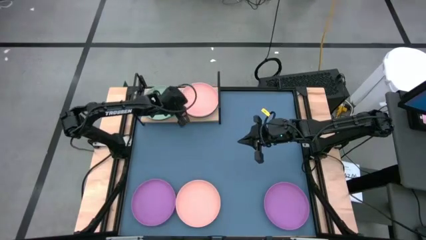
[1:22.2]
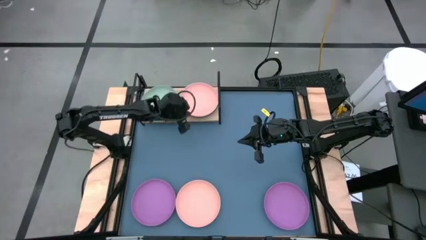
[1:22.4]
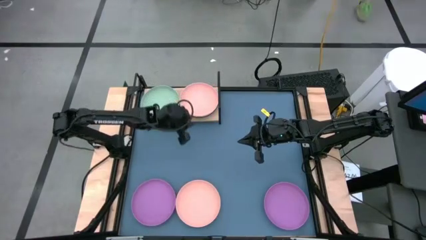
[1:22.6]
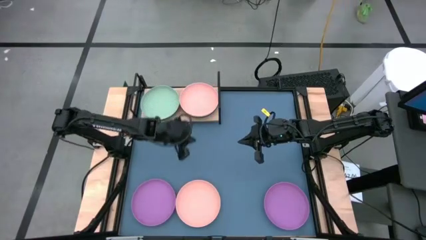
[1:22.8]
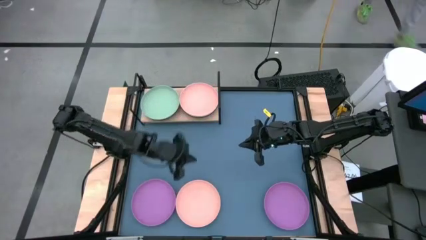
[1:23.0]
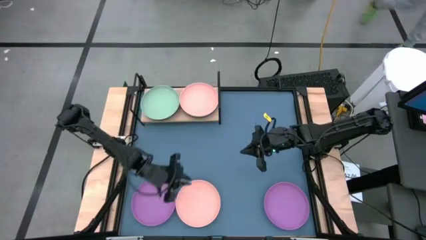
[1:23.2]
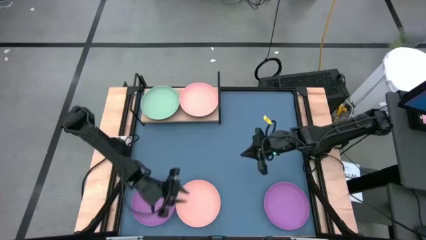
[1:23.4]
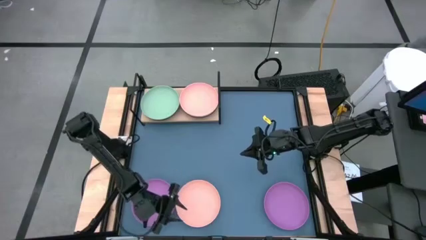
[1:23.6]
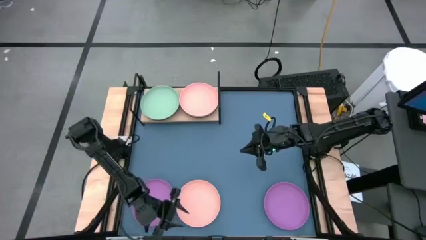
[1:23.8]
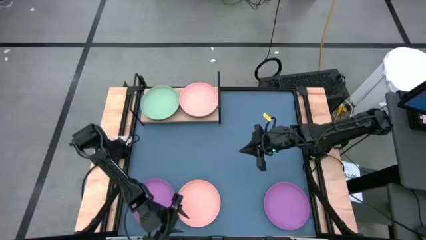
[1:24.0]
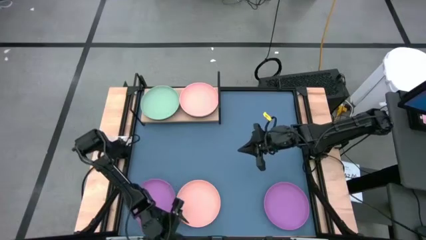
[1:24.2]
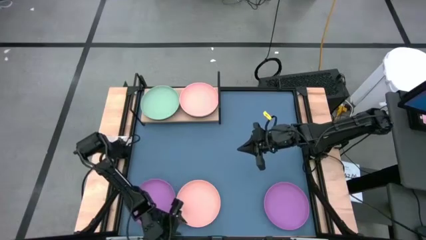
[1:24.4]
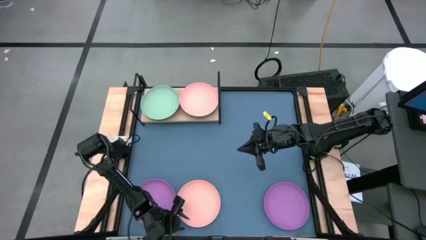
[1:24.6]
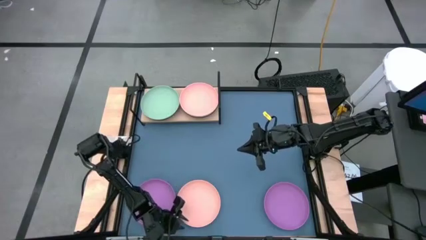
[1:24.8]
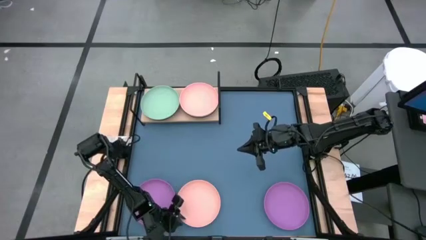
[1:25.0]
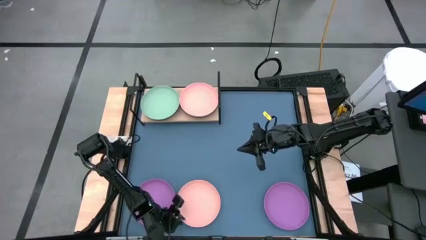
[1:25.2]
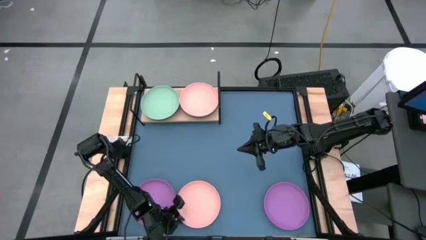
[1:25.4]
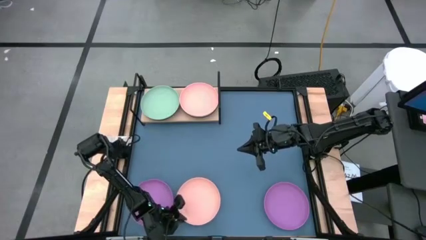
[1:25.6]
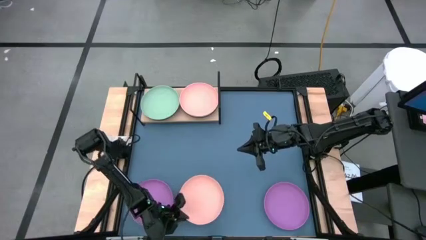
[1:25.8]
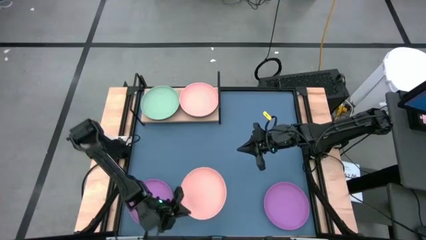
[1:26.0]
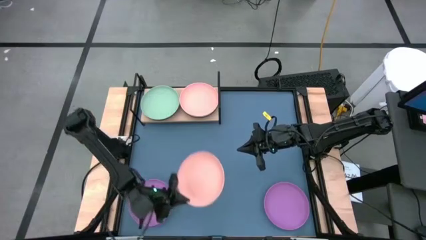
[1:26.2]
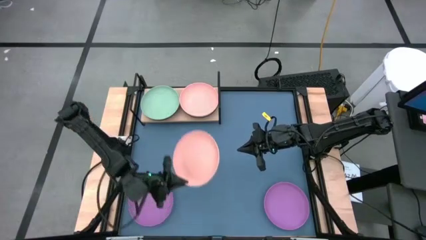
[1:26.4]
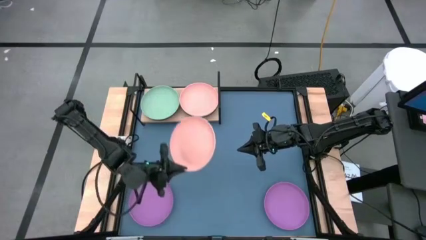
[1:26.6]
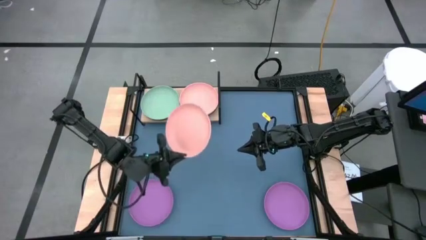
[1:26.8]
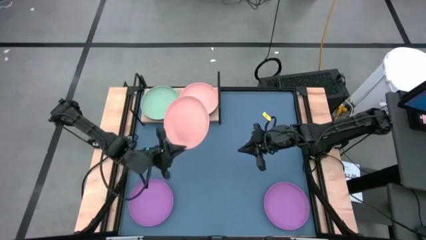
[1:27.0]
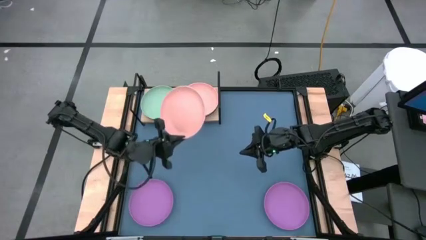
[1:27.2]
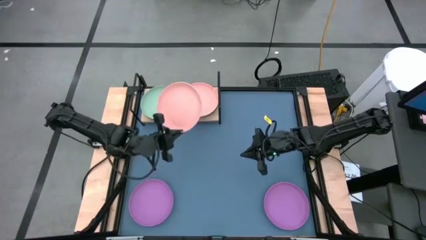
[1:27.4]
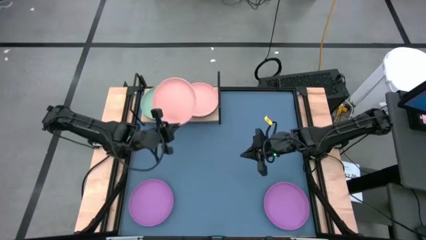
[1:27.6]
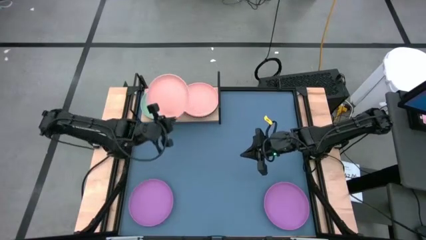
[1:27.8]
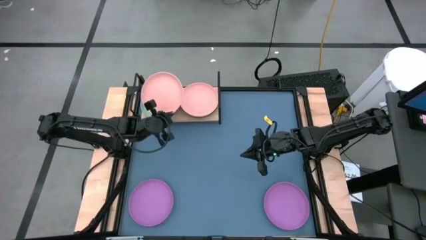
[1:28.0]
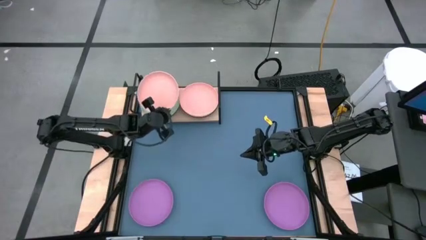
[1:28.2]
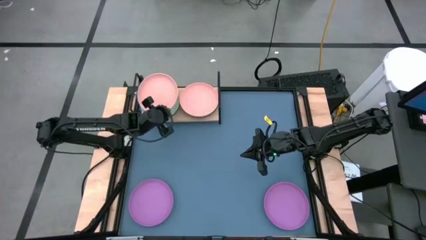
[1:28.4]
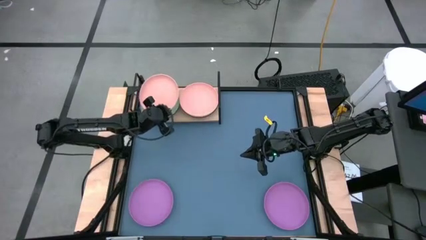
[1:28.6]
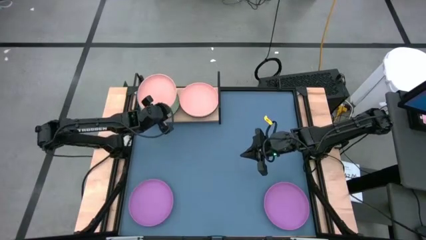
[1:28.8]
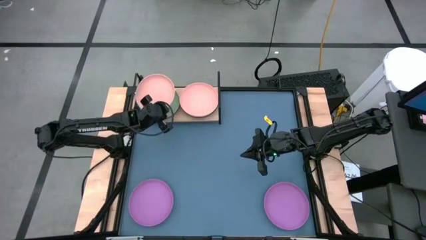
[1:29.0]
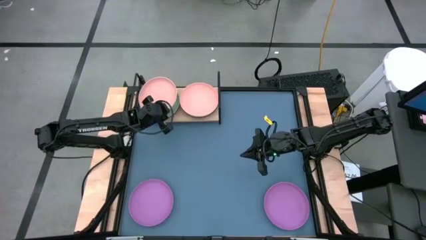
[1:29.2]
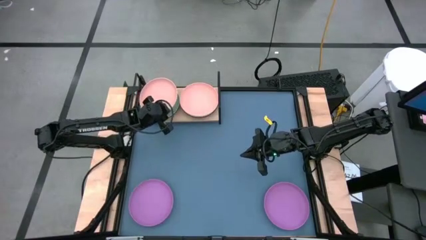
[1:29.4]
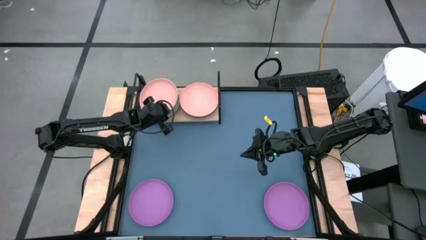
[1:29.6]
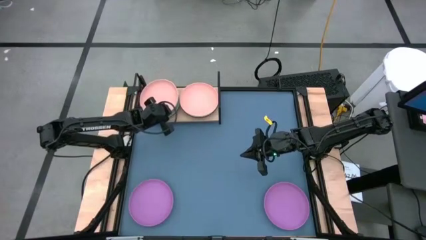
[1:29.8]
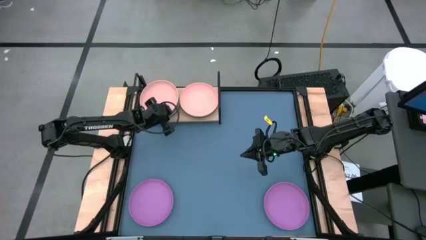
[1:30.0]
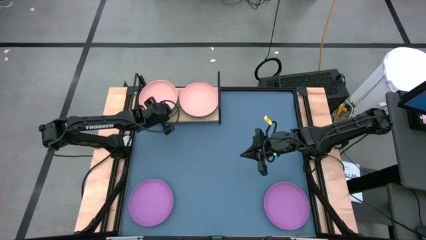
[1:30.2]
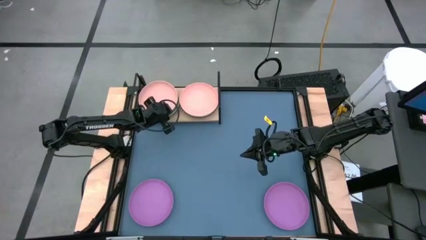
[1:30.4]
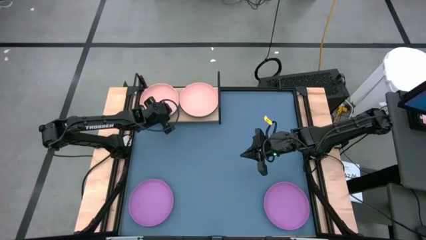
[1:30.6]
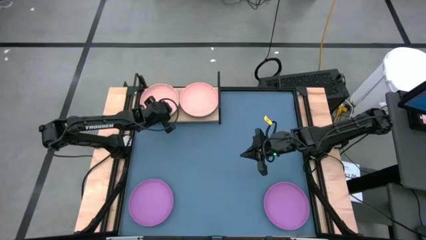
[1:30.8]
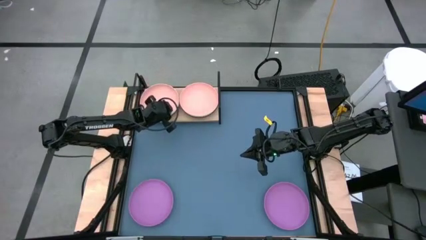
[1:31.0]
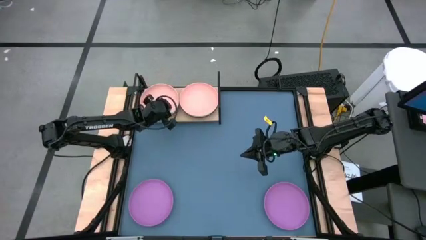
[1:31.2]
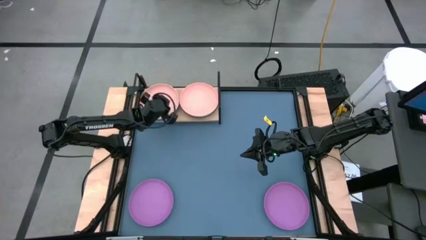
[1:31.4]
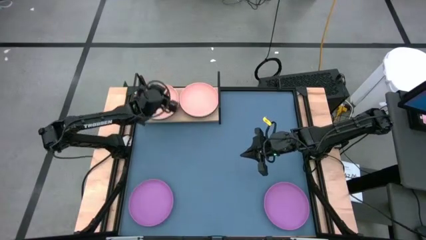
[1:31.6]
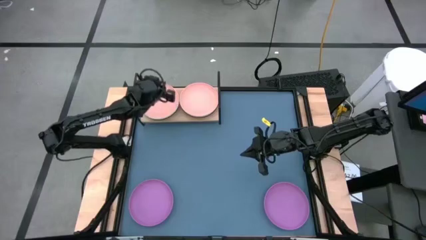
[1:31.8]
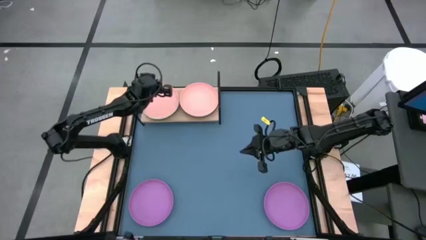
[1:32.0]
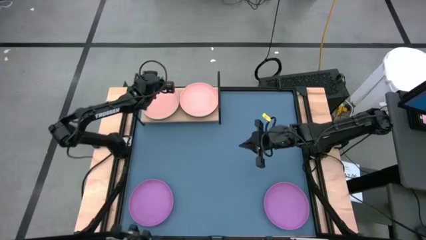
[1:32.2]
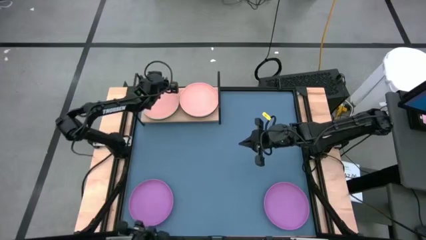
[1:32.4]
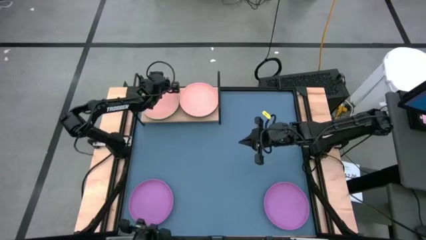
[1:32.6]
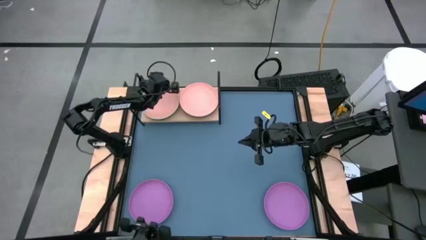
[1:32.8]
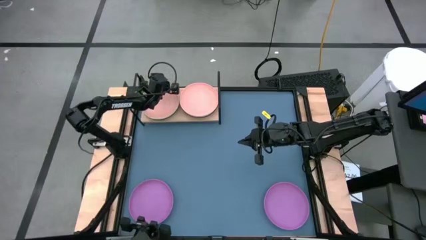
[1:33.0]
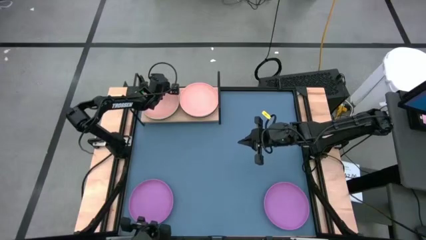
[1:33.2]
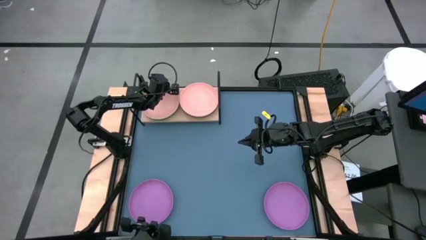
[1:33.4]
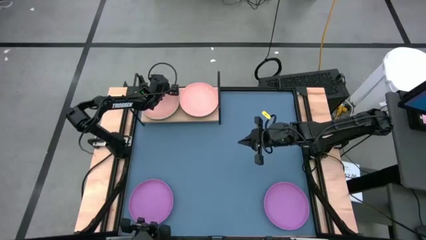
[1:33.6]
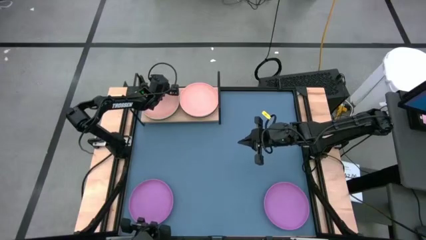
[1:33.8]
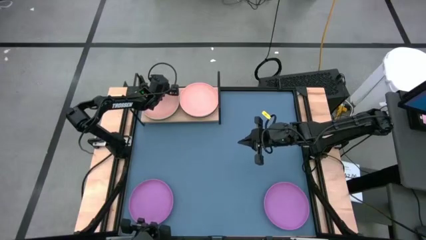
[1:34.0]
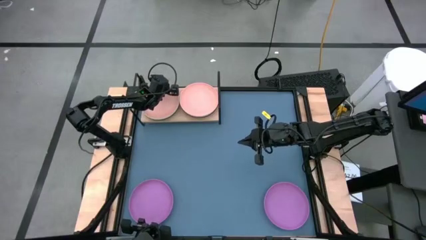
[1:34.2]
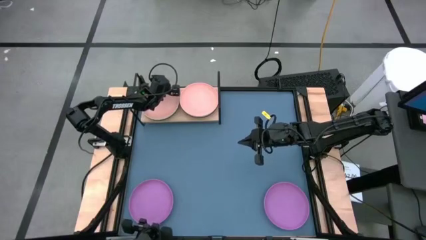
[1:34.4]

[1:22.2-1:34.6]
Task: Place and stack plates onto a shelf
Stack the light pink plate on top of the light green plate on the shelf
